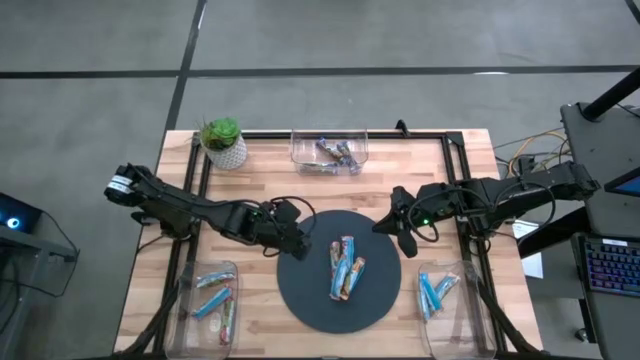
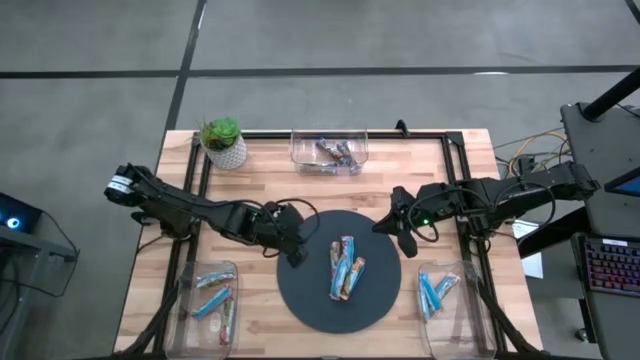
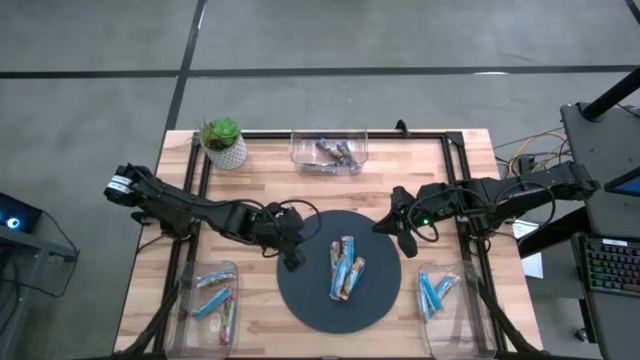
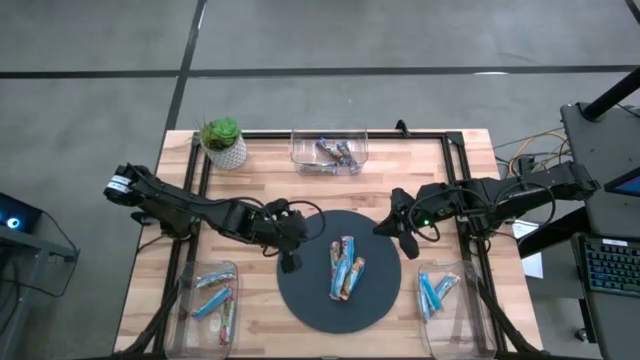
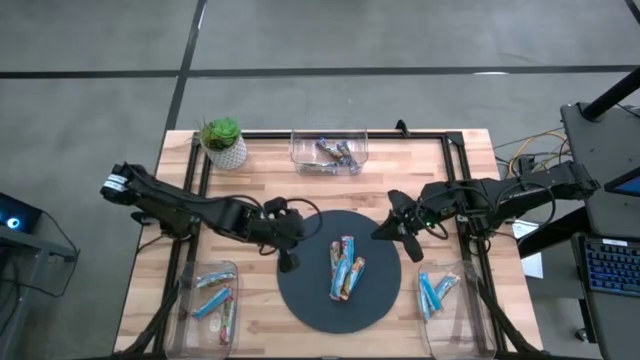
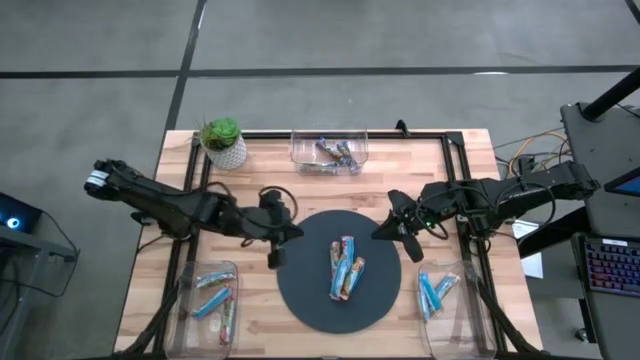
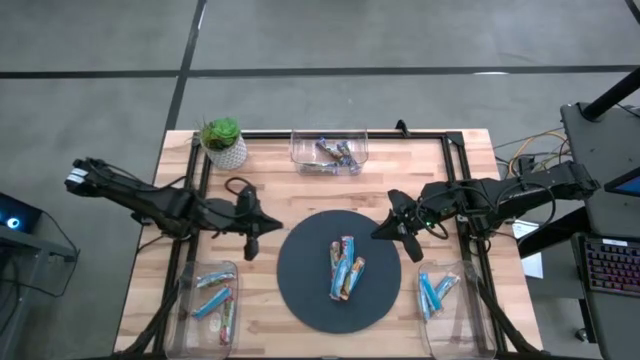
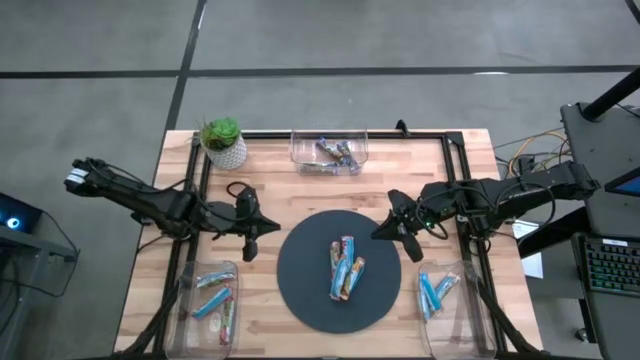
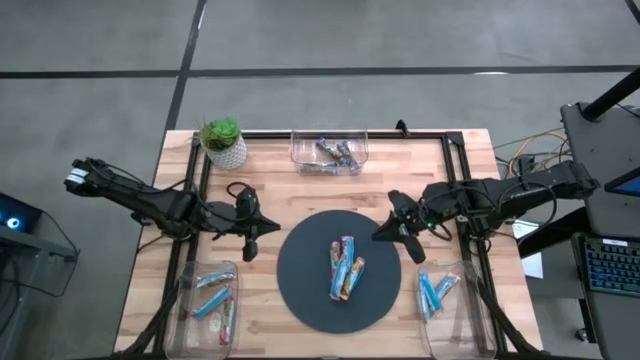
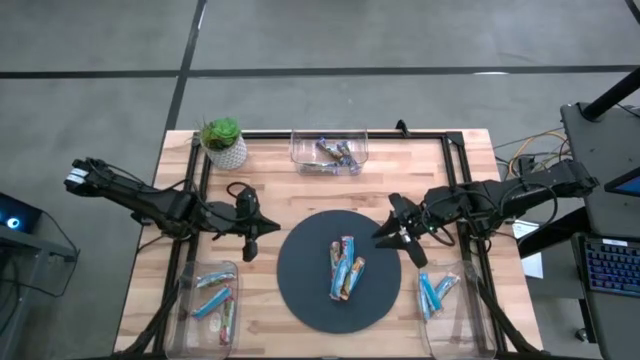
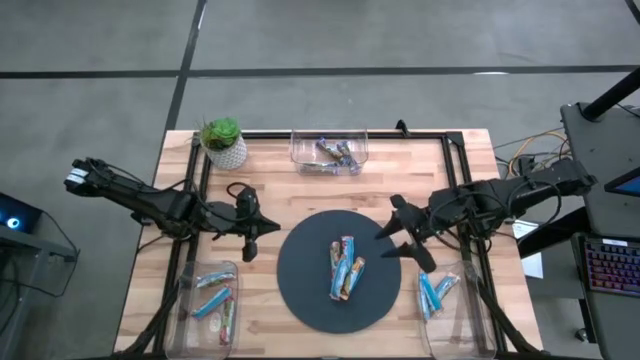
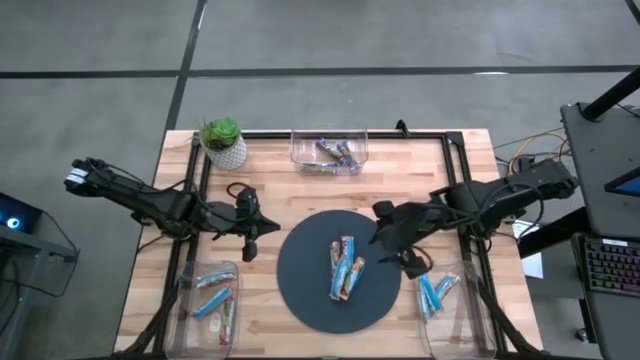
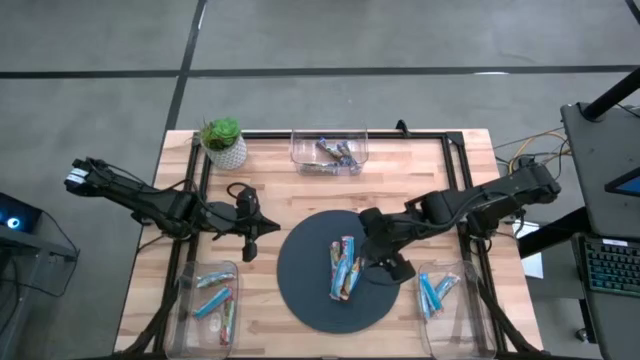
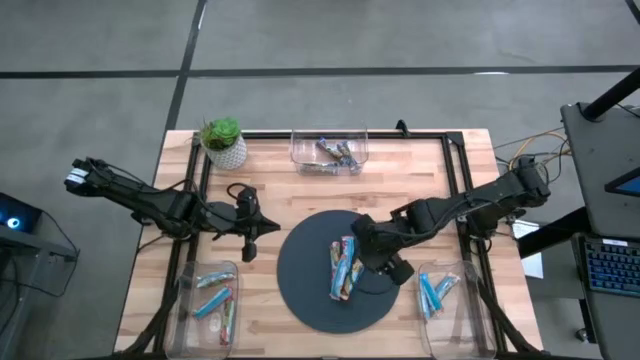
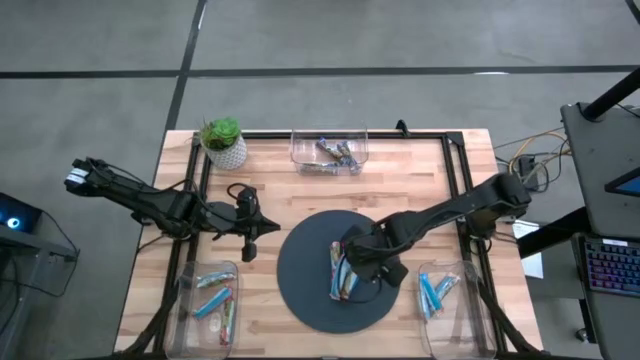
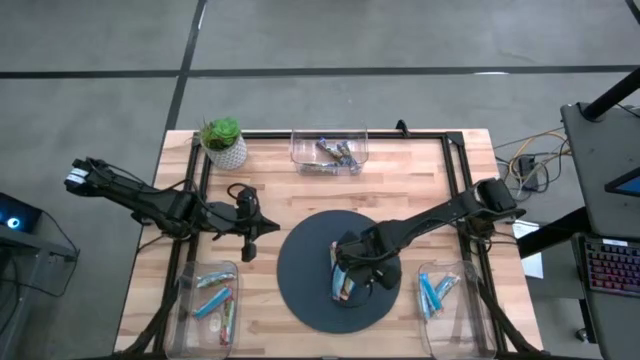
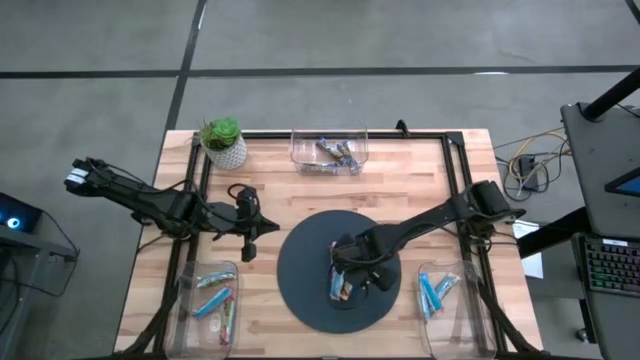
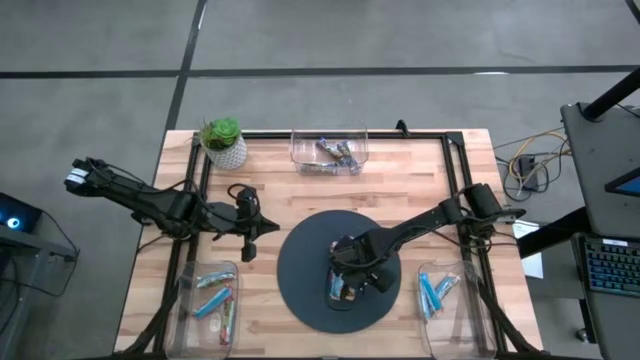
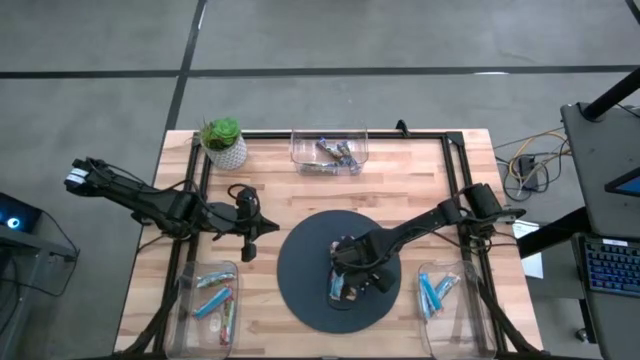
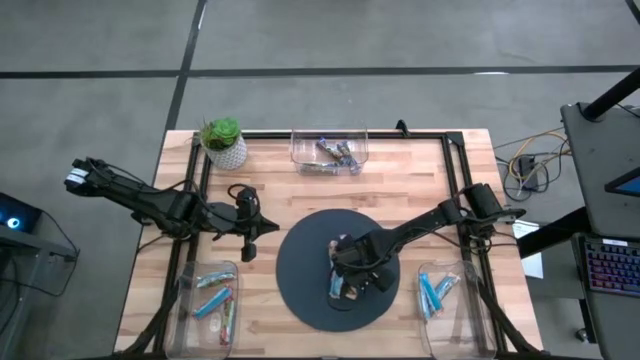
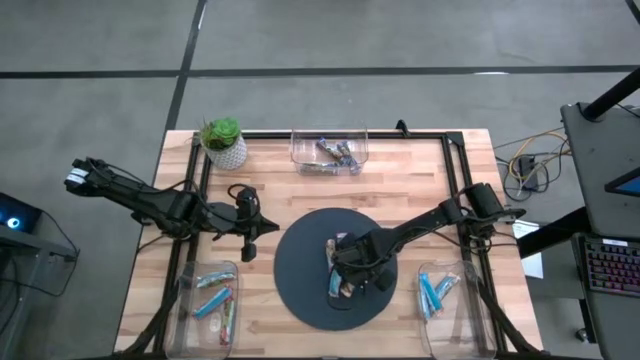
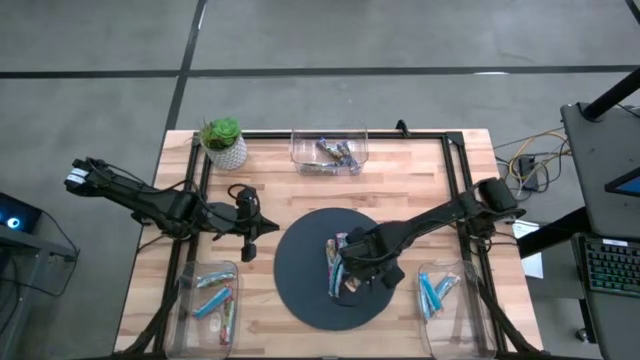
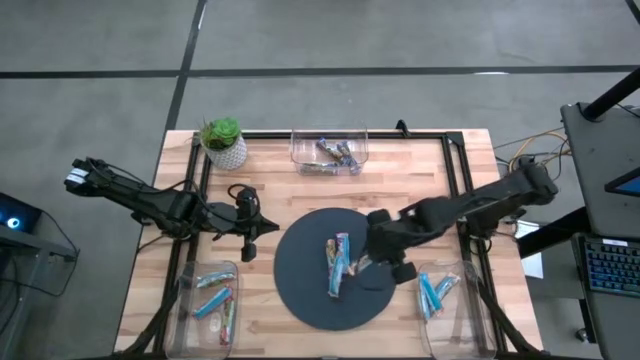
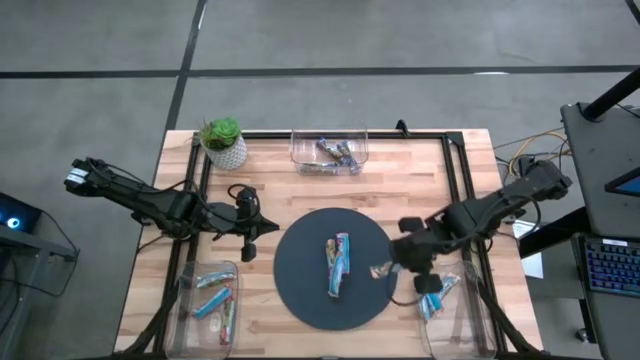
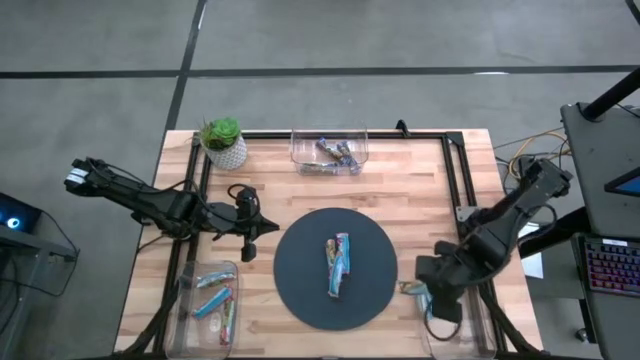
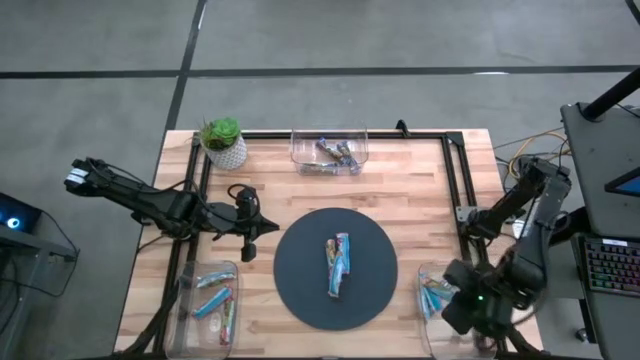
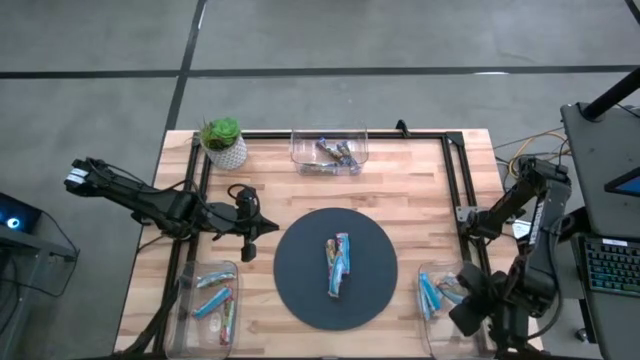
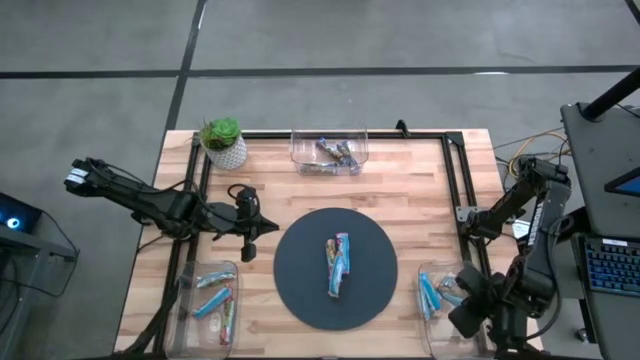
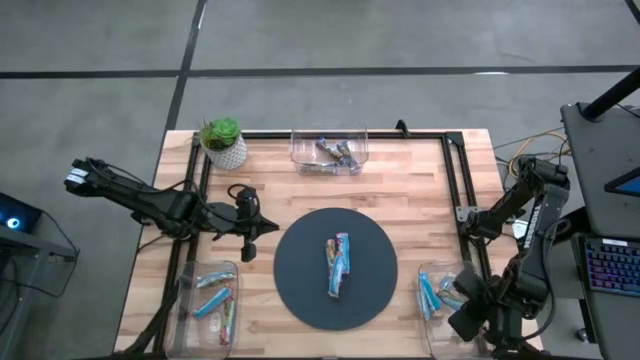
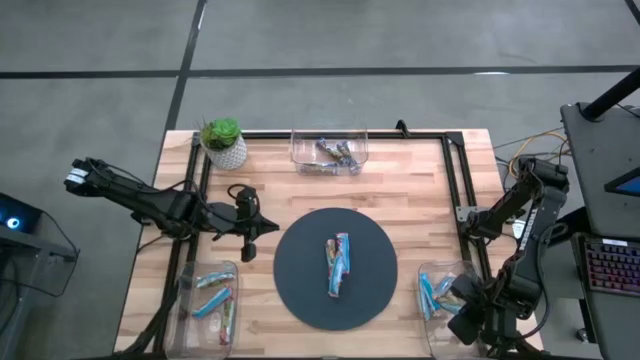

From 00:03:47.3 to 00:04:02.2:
Task: Pick and place Granola Bars by type
Put the yellow granola bar into the bottom right transparent bin

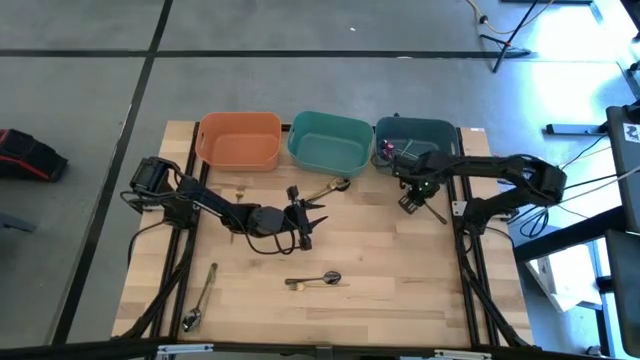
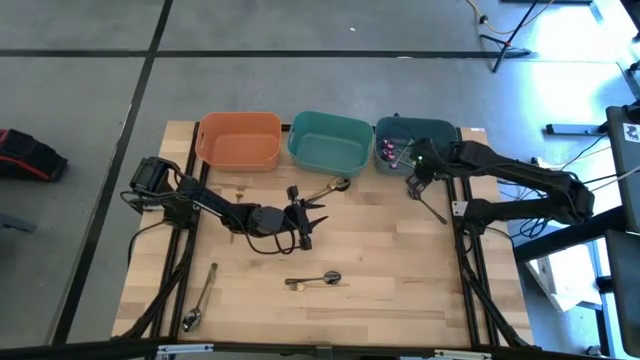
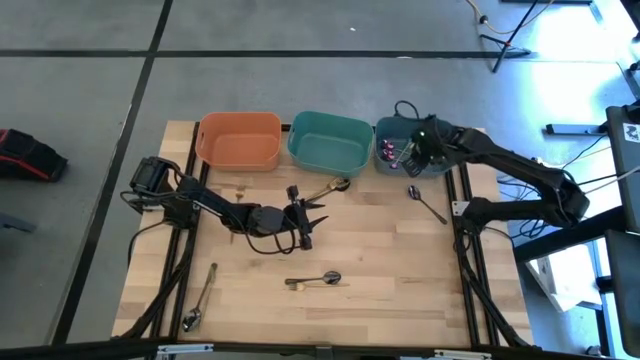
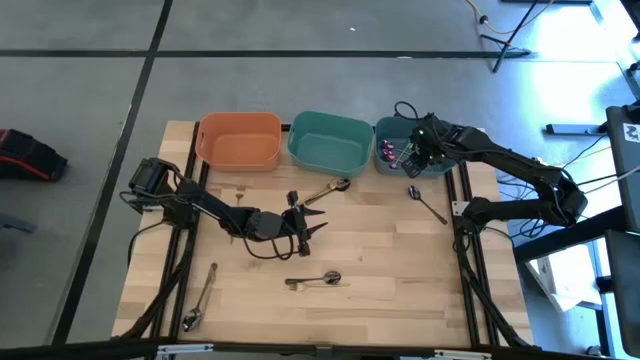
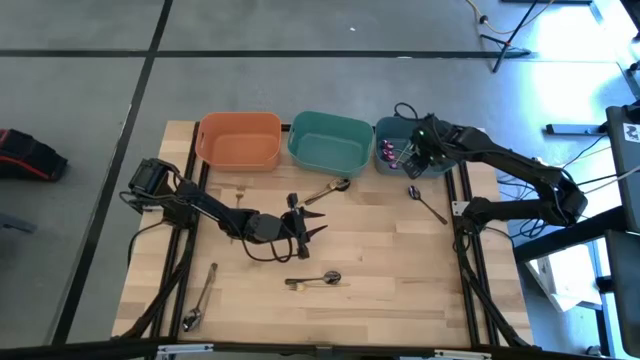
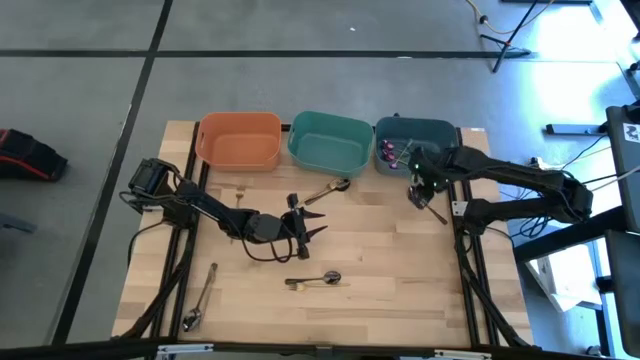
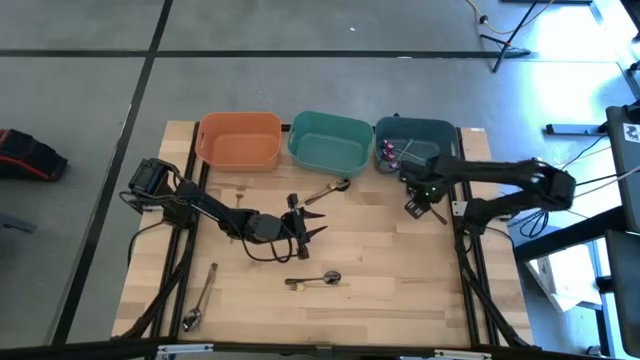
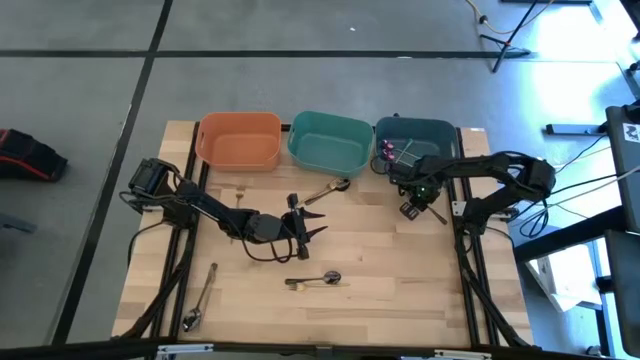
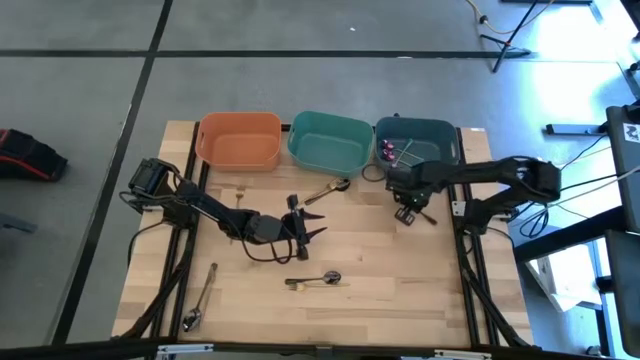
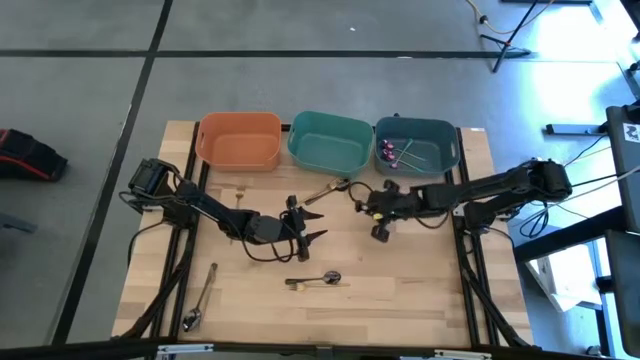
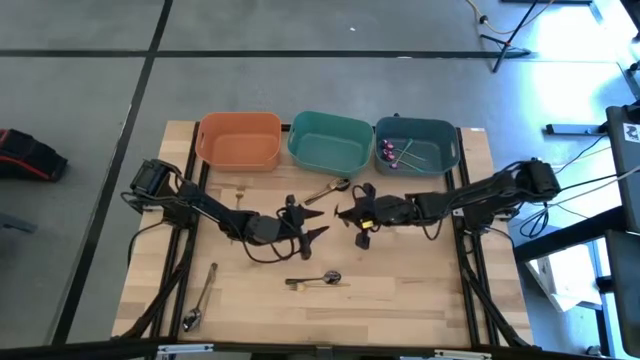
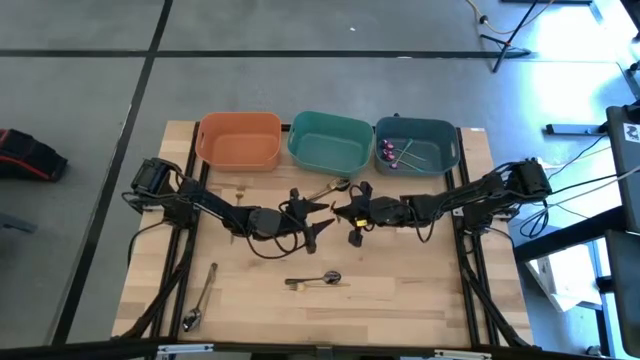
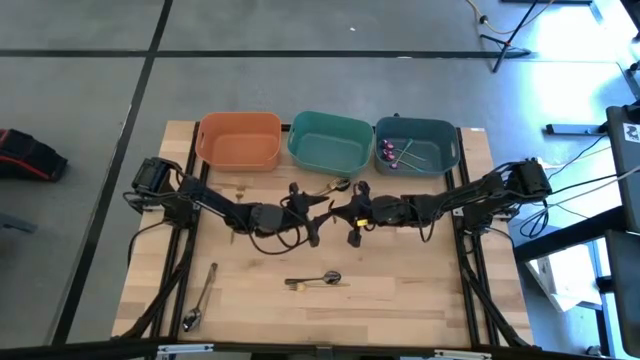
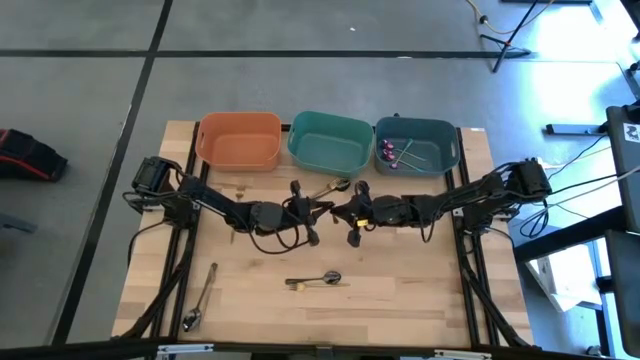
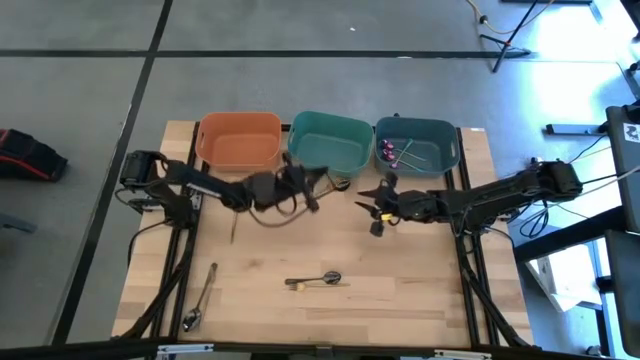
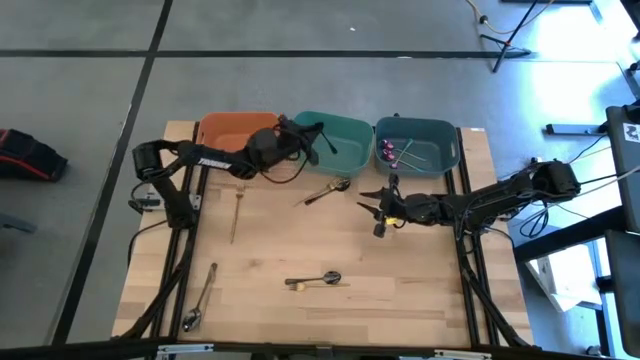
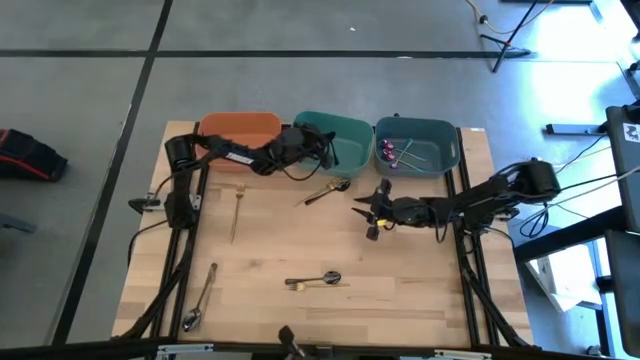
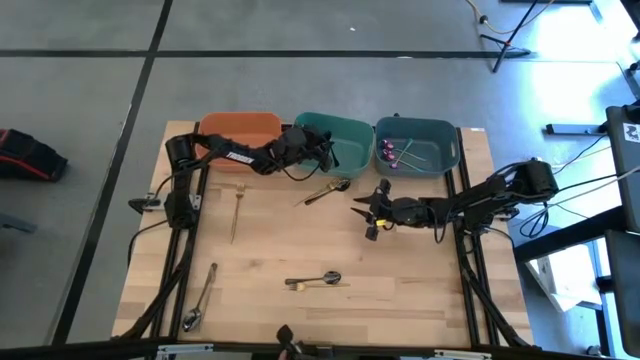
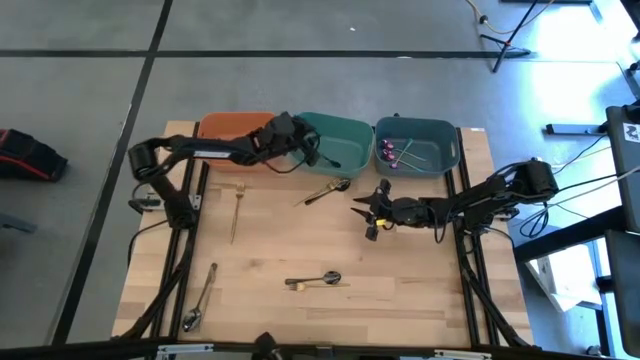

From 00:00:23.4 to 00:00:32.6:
Task: Sort silverware by color (type)
Put the black spoon into the green bin
